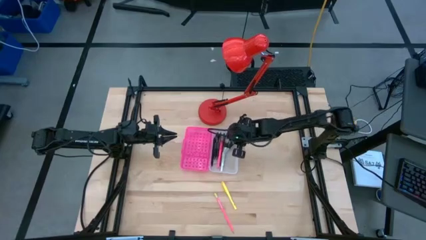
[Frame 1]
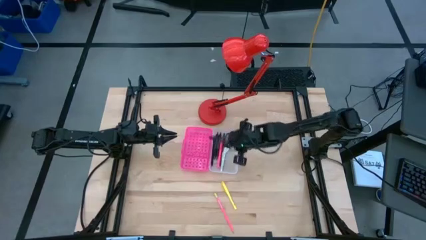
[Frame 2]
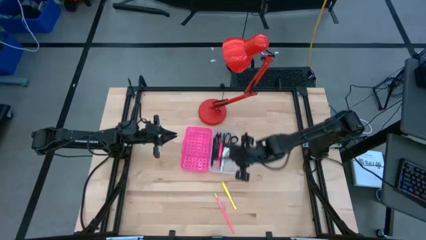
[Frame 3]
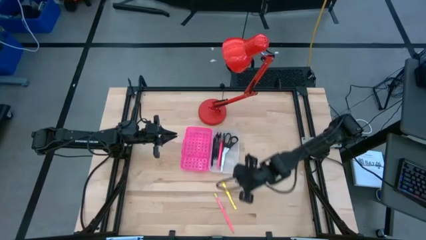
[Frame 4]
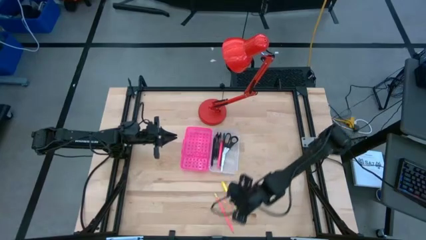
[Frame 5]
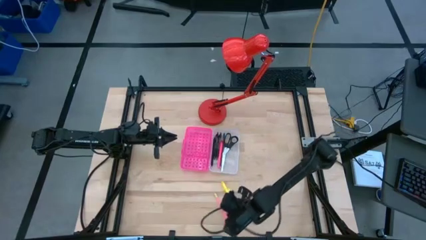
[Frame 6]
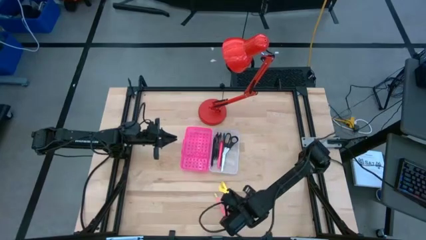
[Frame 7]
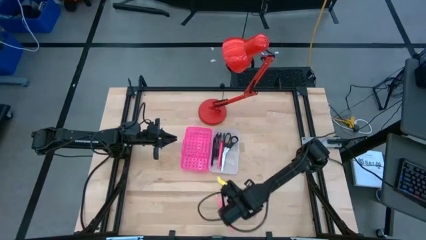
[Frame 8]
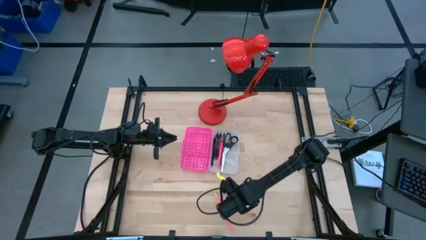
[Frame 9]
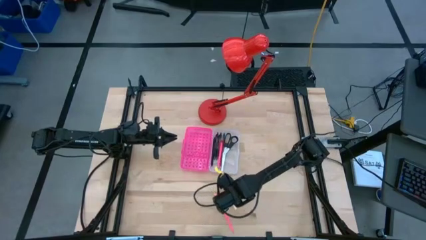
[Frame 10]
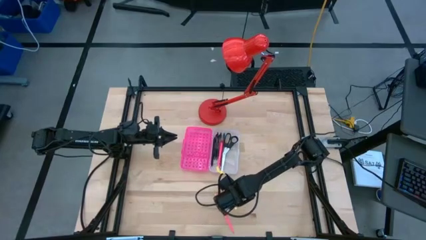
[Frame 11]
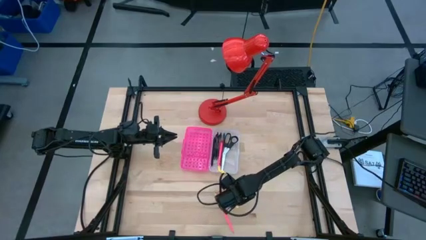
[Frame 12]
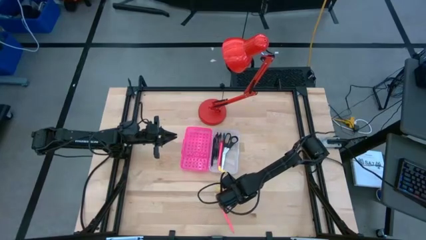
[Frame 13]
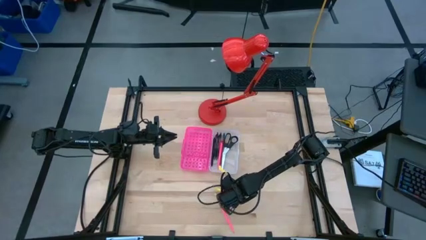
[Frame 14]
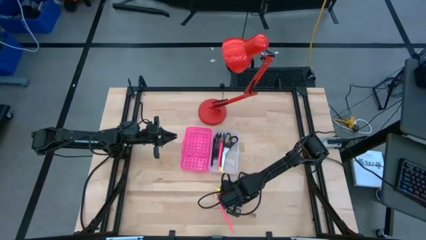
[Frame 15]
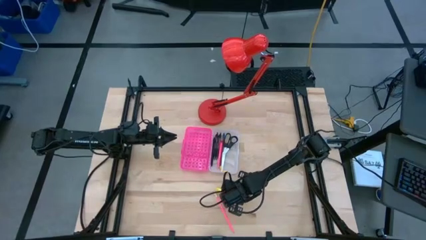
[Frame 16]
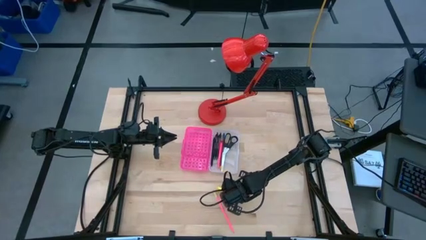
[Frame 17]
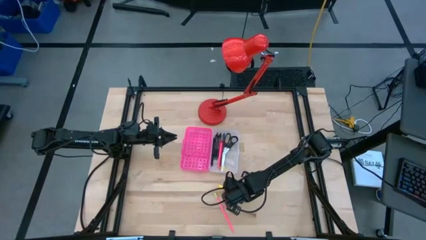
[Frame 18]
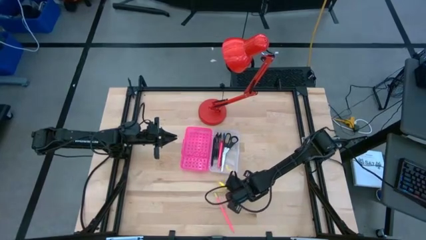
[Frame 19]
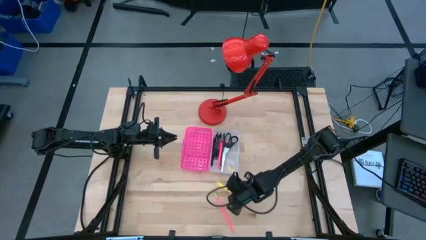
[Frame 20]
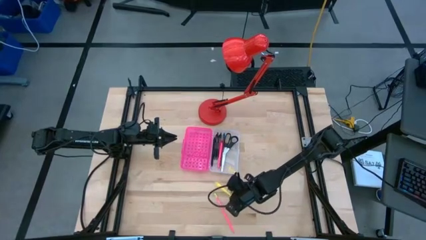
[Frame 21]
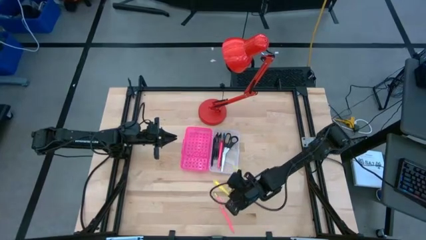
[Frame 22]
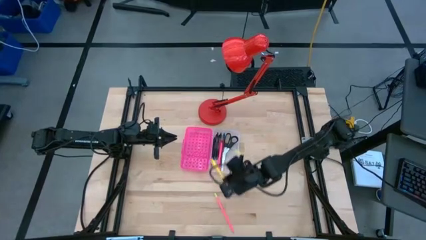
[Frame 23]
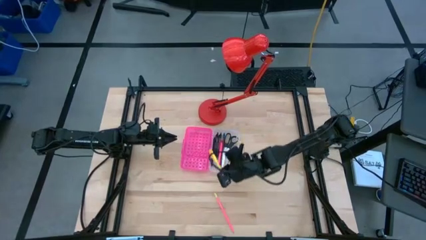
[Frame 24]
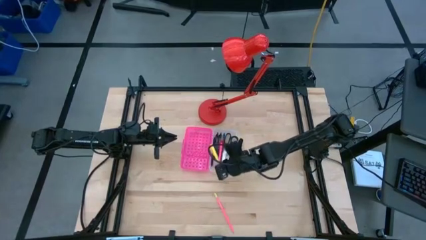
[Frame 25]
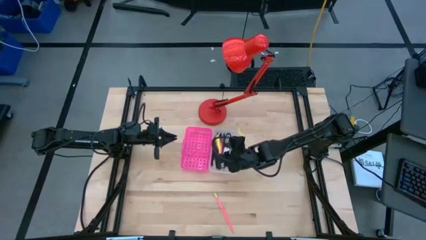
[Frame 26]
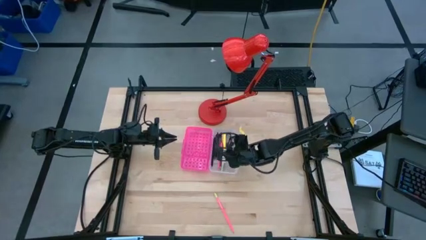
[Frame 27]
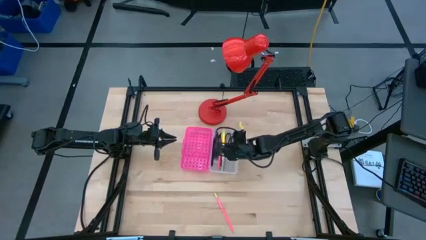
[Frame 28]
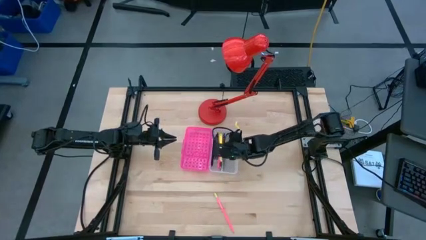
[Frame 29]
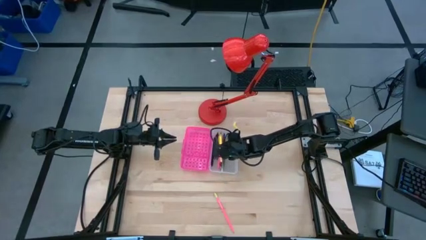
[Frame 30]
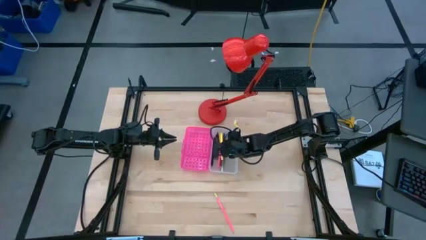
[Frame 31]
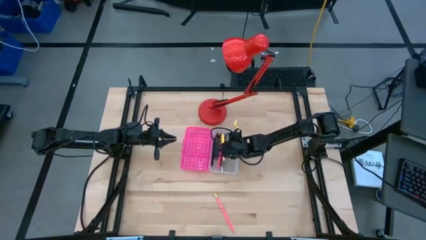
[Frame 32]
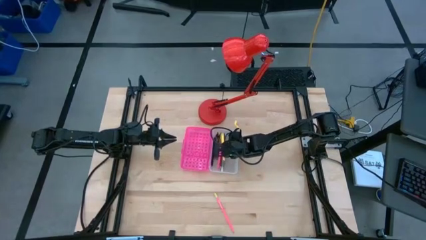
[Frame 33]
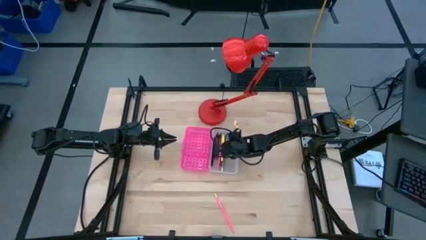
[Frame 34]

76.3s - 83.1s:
Task: Pick & place school supplies into a supply box
Put the yellow pen into the supply box

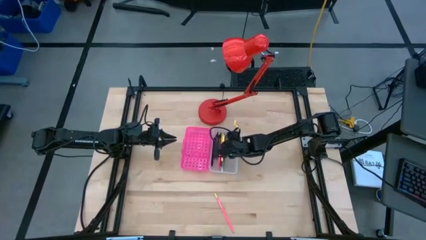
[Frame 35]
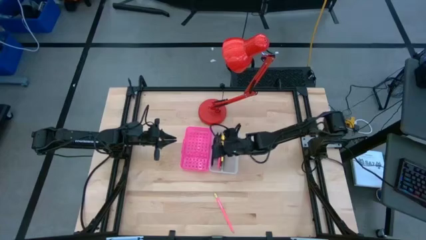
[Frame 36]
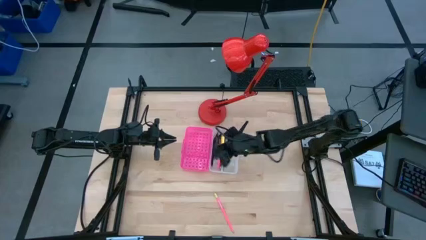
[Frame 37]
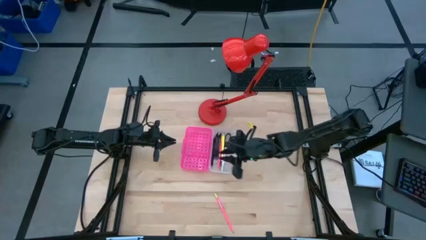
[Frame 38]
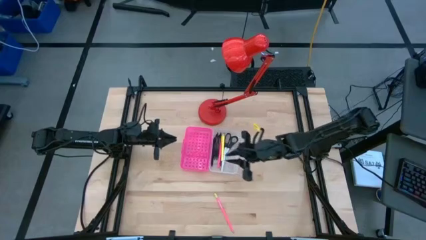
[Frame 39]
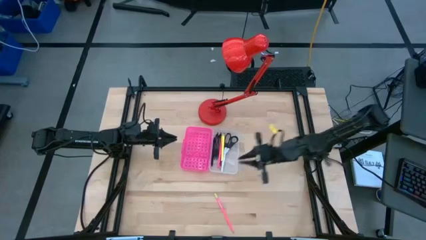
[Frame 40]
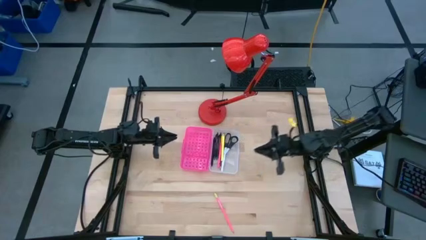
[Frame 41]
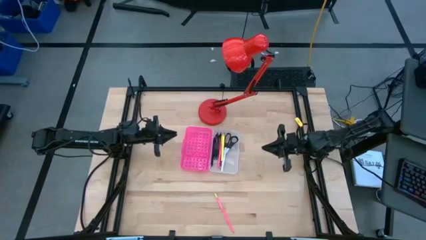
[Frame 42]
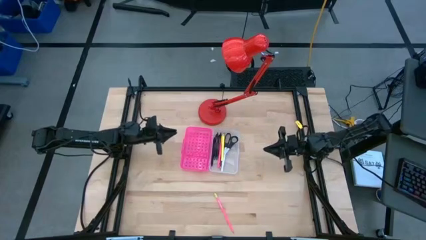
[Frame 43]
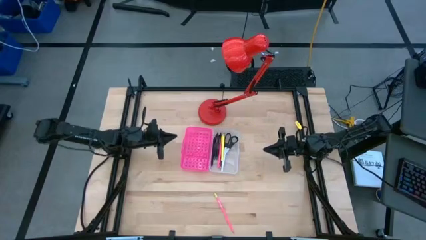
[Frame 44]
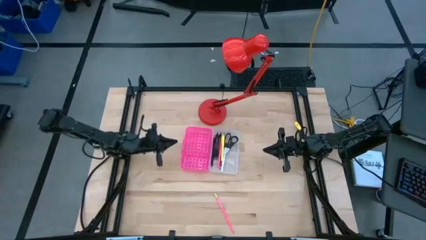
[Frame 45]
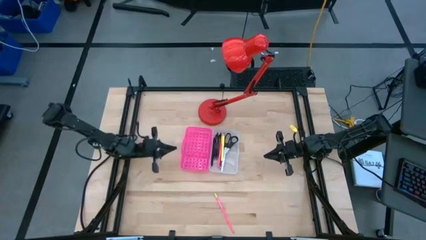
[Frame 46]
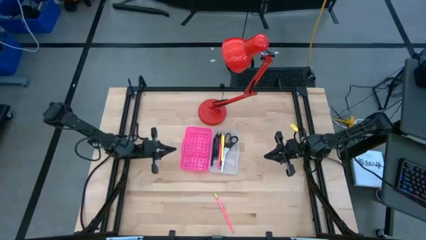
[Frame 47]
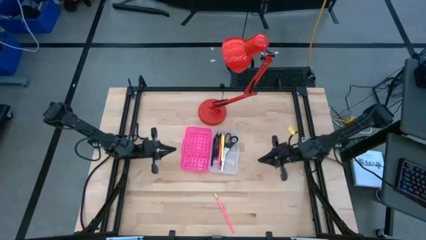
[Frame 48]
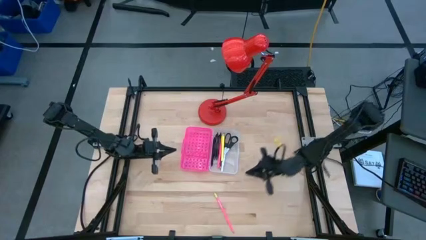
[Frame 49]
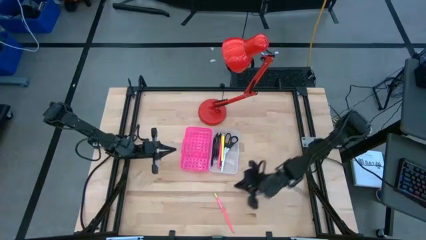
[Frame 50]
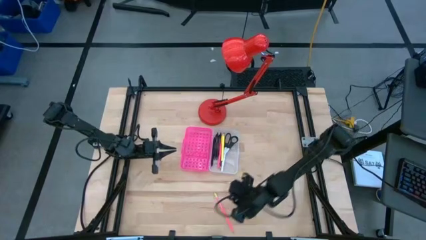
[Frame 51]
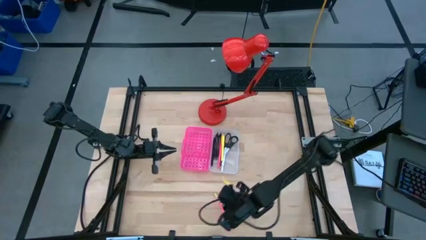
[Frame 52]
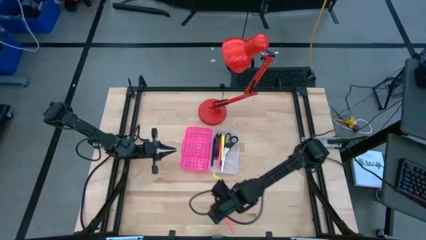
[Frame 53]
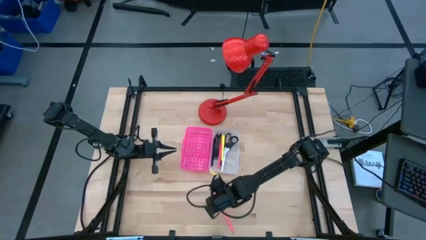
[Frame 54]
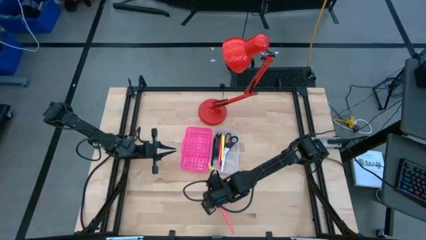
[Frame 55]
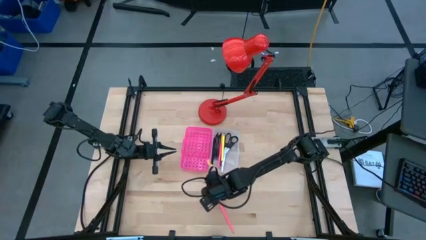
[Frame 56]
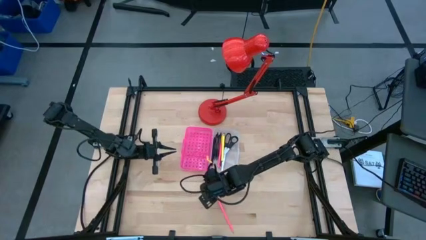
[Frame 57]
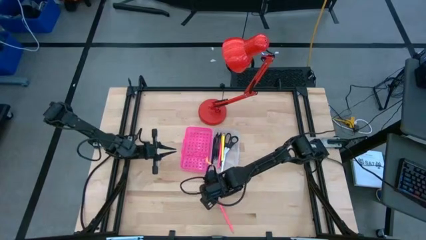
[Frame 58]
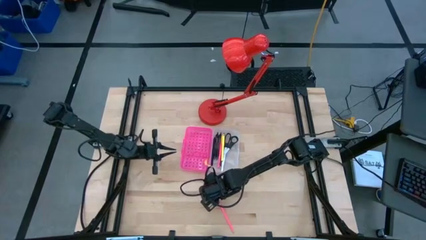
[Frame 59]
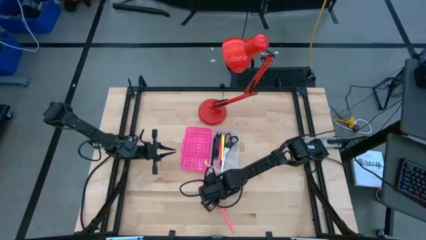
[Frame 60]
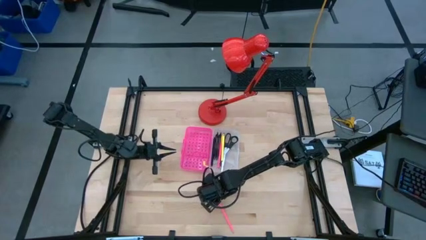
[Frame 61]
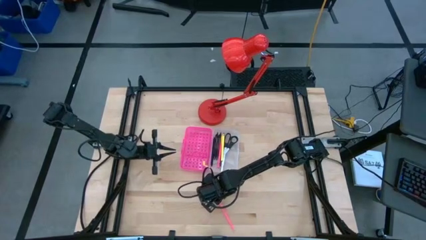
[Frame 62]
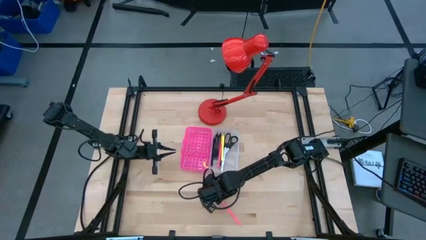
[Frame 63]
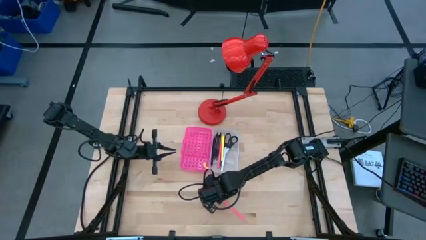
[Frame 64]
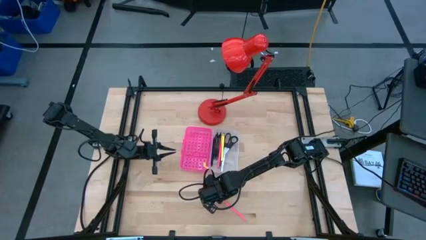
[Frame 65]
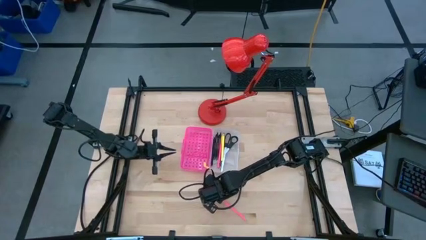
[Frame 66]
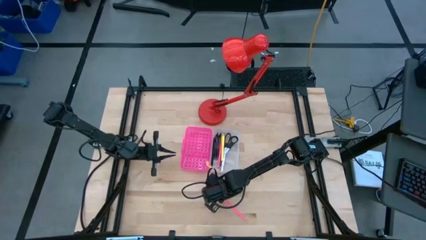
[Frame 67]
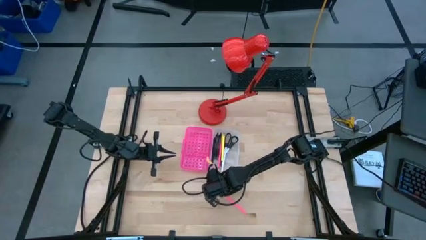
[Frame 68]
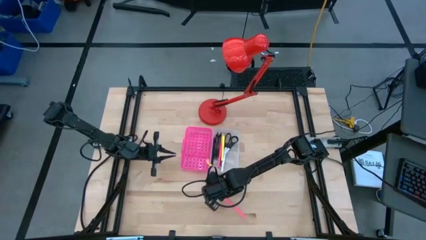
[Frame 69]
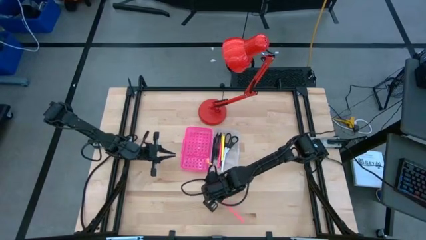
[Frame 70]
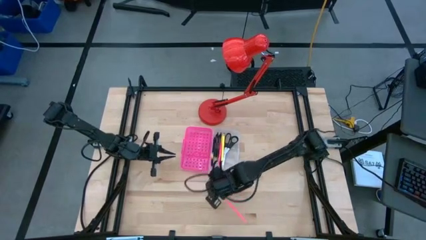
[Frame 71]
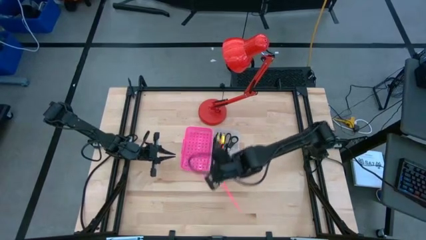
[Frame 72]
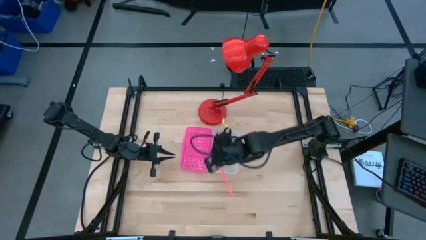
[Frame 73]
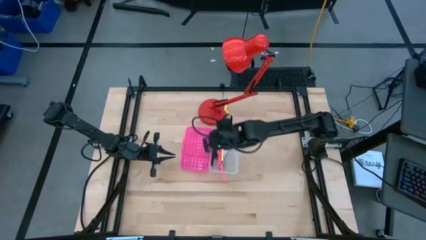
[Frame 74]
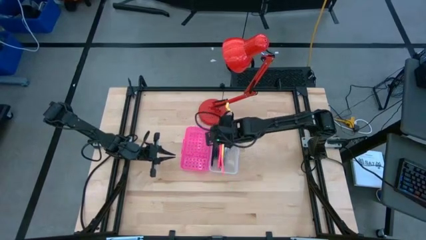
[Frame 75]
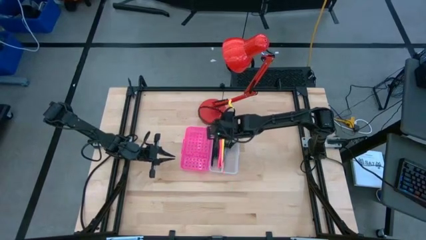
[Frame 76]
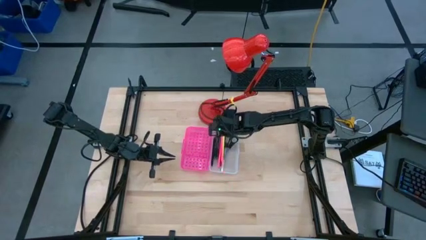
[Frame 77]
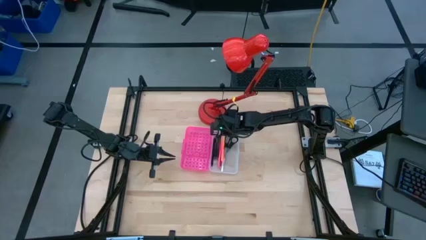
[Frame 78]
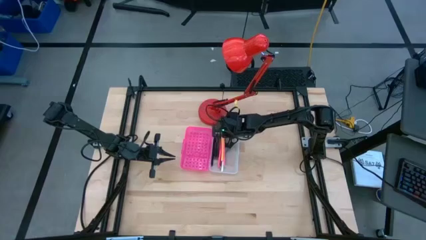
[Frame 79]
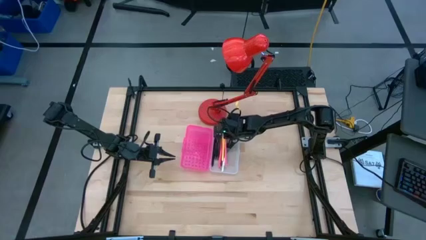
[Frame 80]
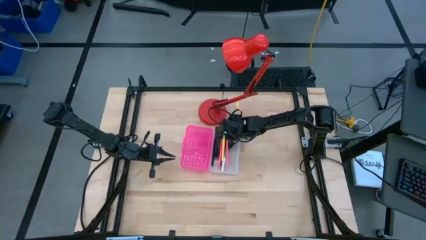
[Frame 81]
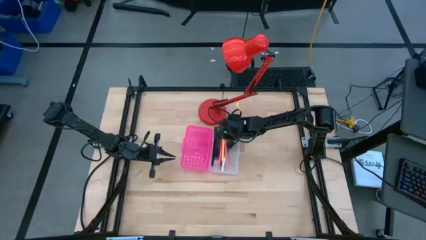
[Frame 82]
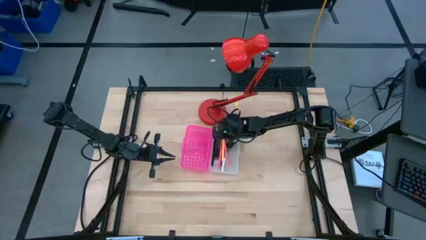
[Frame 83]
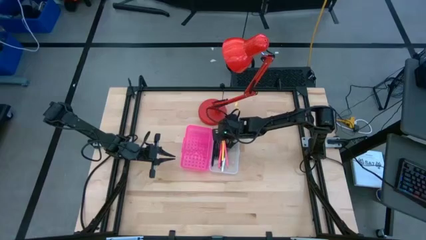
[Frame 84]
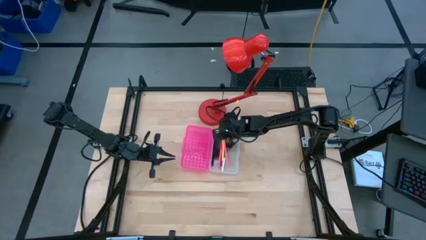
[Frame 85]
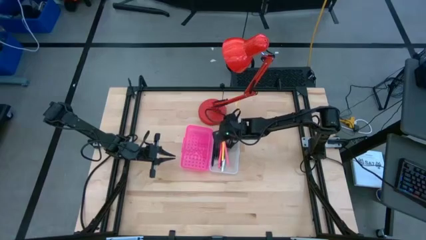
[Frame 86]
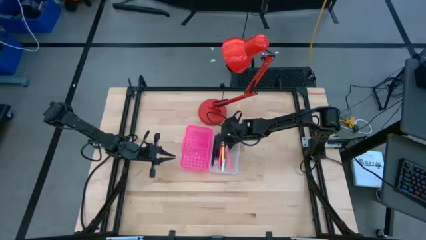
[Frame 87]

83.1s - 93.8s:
Put the pink pencil into the supply box
